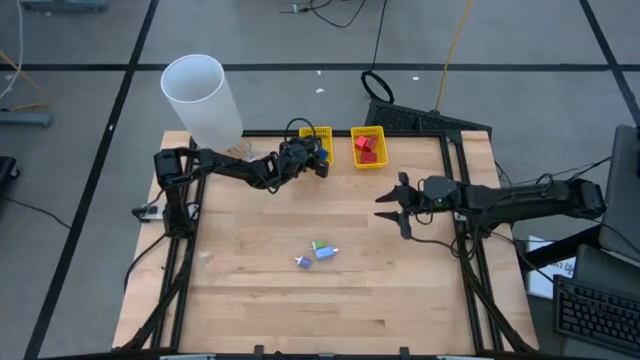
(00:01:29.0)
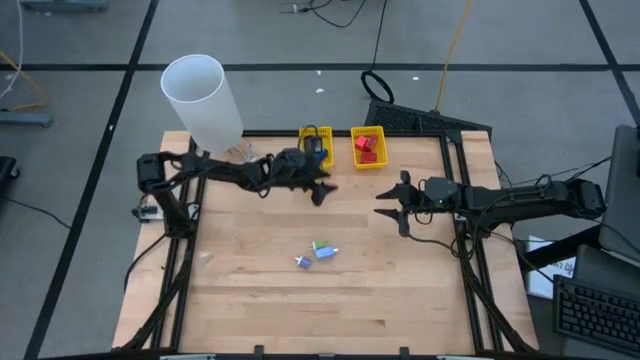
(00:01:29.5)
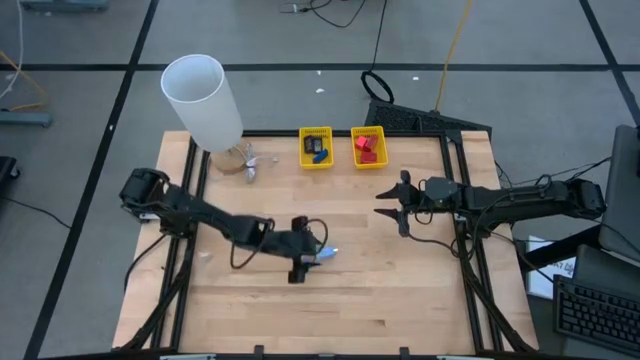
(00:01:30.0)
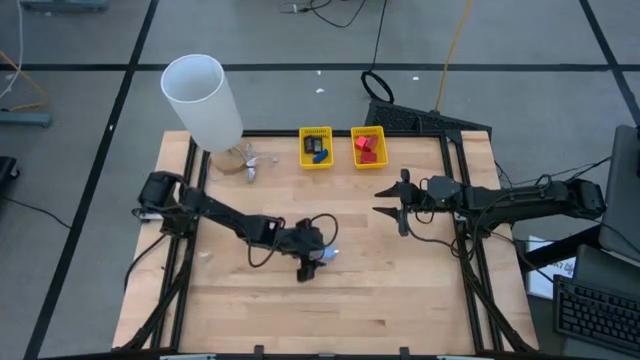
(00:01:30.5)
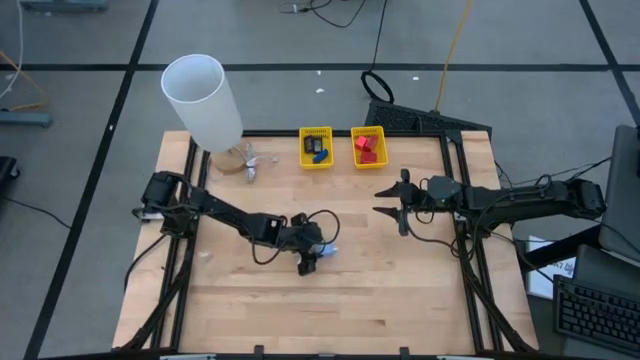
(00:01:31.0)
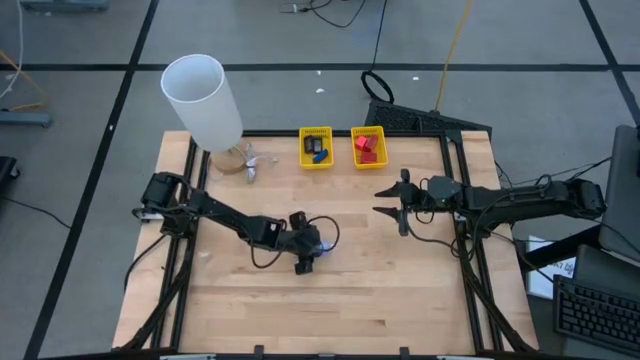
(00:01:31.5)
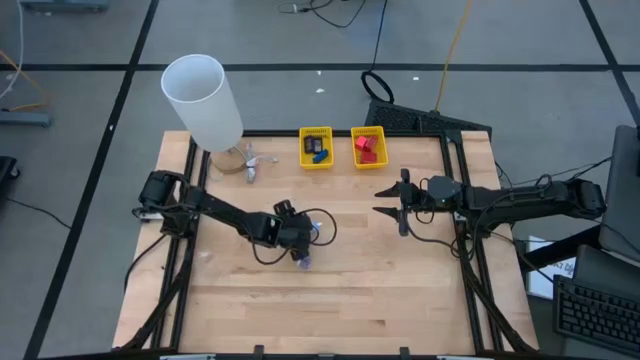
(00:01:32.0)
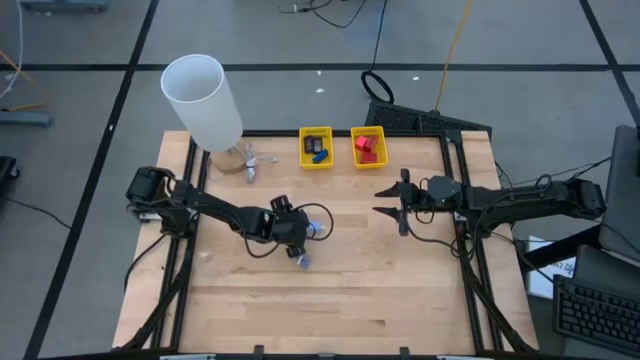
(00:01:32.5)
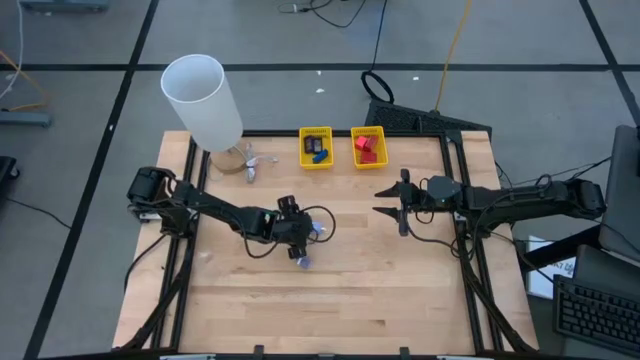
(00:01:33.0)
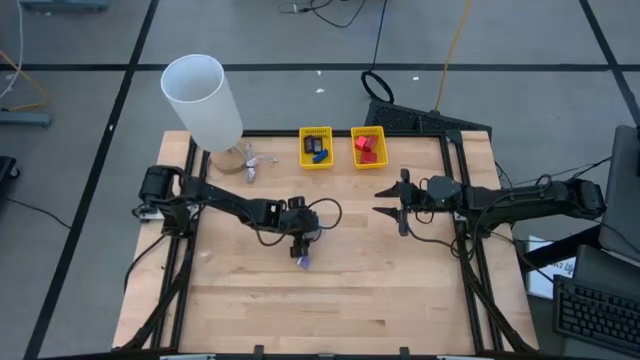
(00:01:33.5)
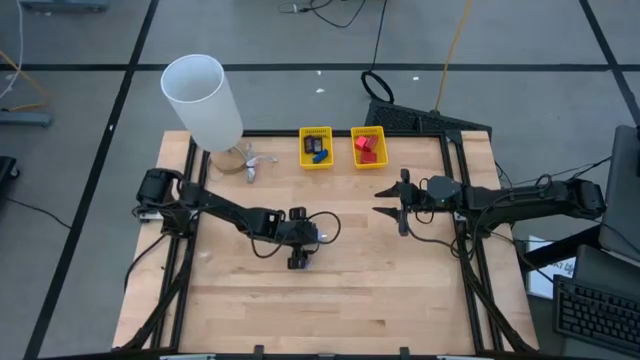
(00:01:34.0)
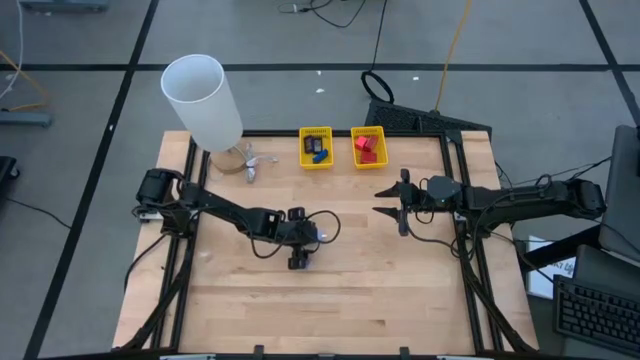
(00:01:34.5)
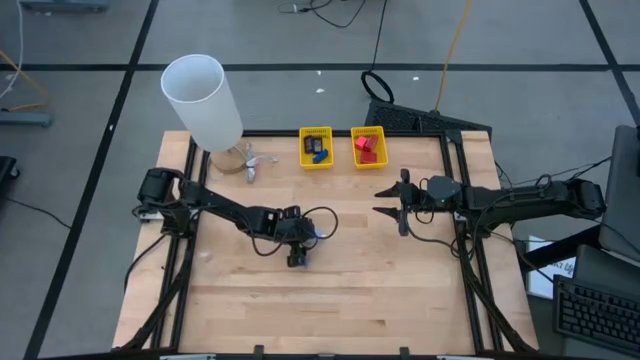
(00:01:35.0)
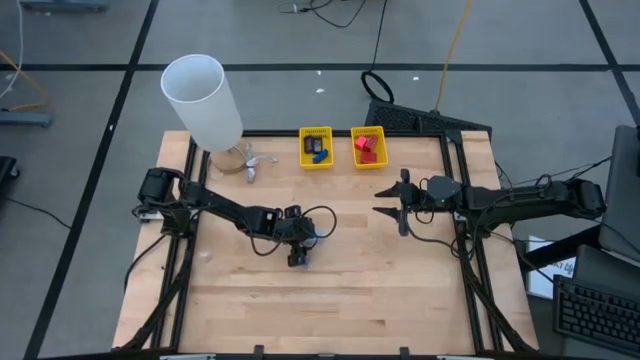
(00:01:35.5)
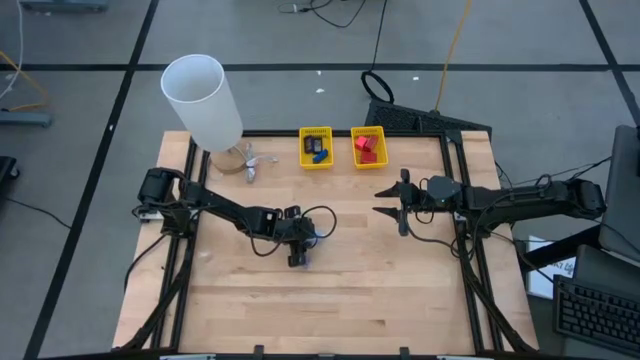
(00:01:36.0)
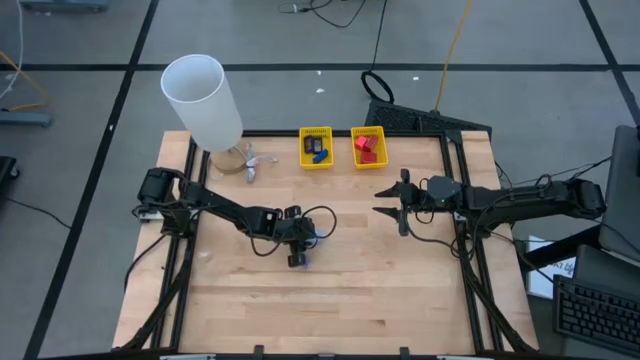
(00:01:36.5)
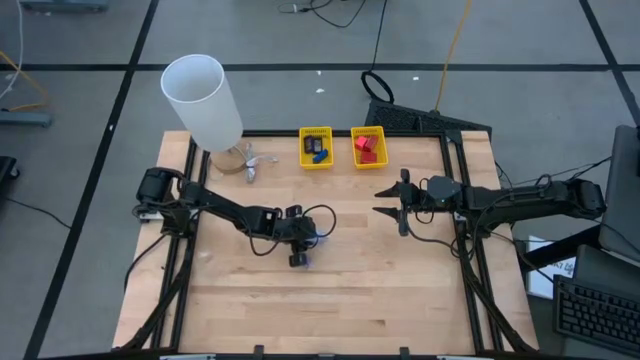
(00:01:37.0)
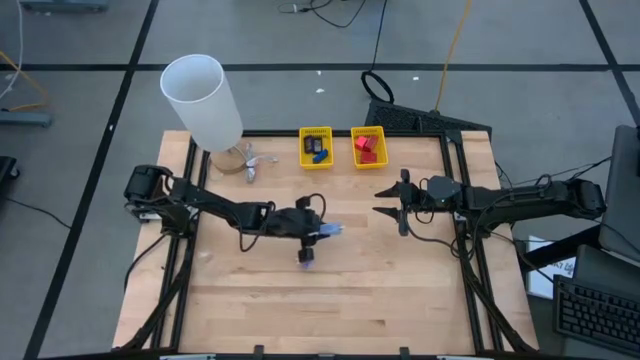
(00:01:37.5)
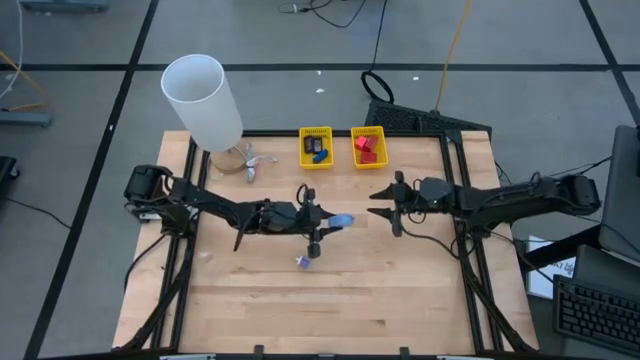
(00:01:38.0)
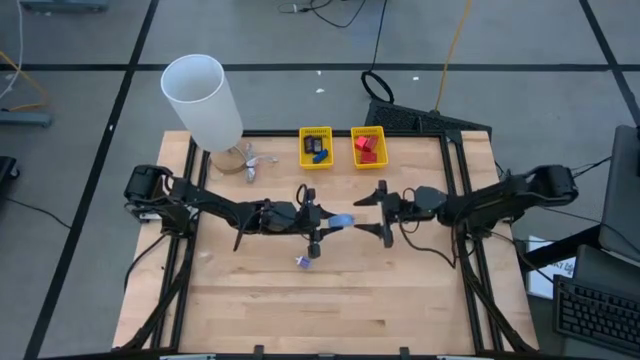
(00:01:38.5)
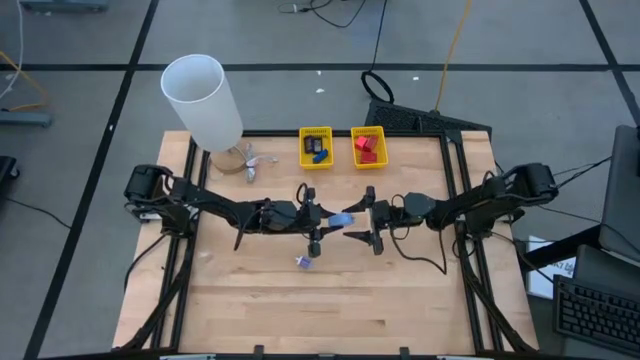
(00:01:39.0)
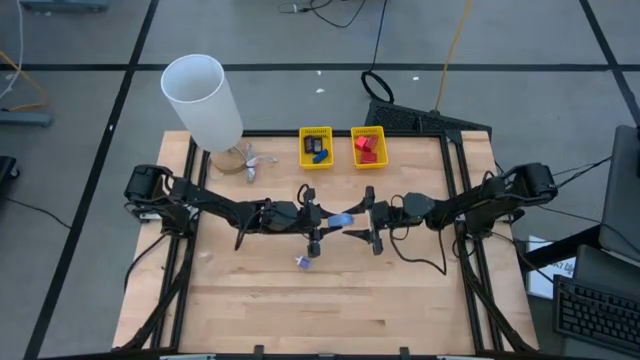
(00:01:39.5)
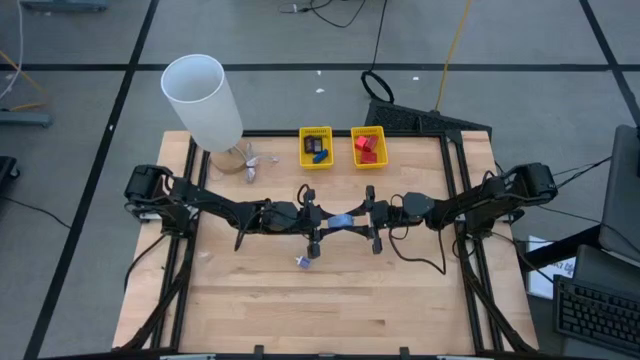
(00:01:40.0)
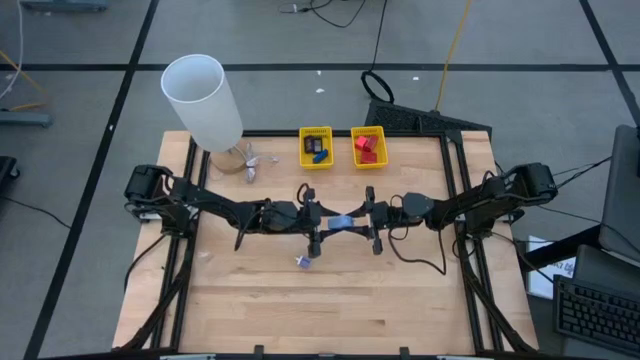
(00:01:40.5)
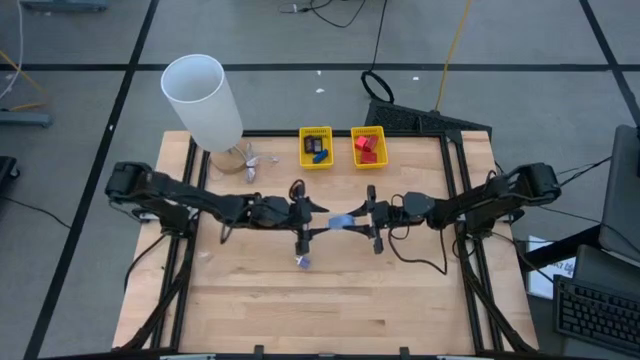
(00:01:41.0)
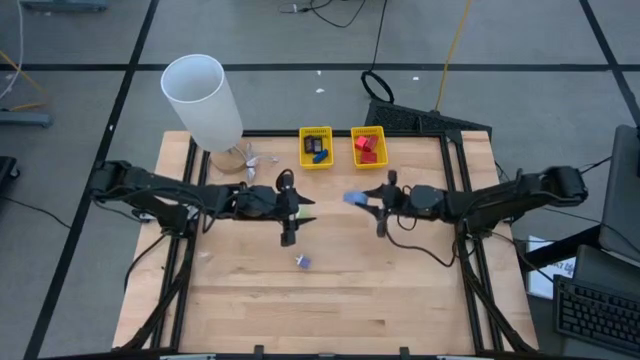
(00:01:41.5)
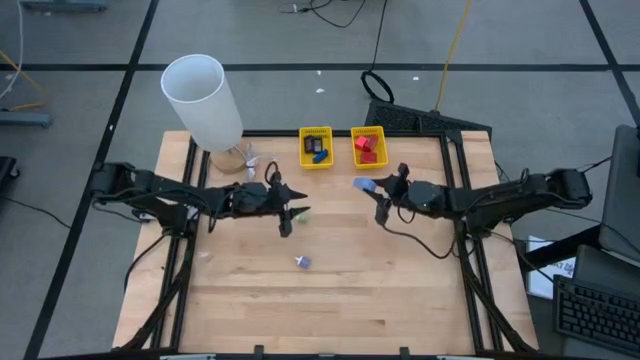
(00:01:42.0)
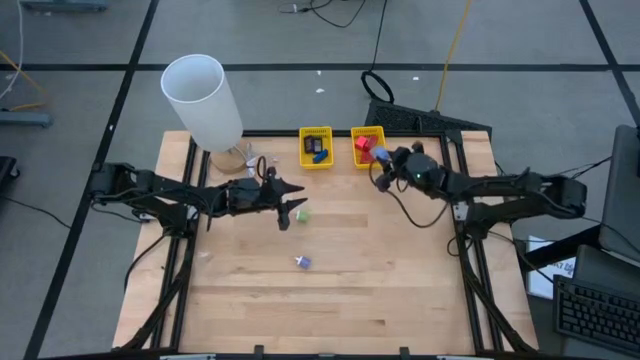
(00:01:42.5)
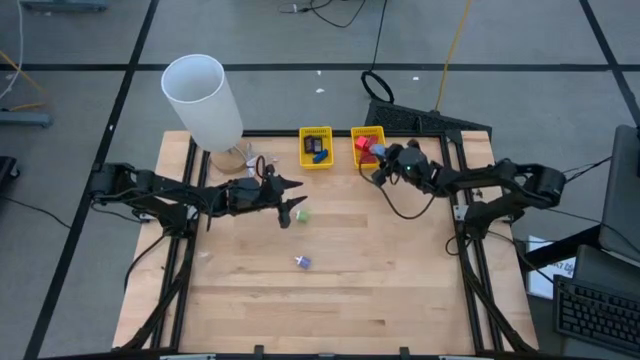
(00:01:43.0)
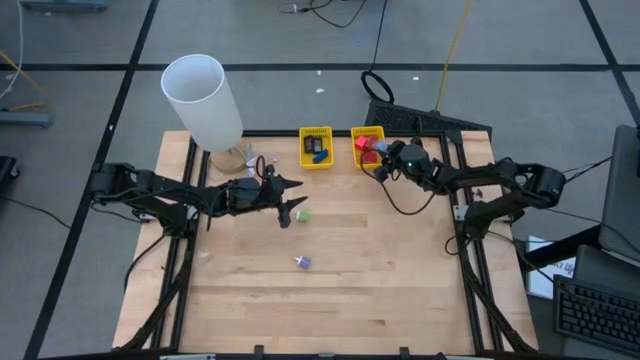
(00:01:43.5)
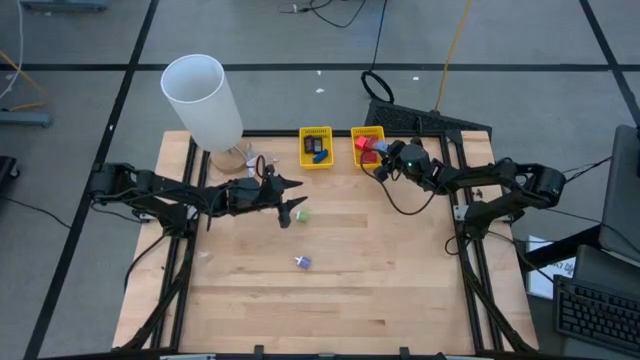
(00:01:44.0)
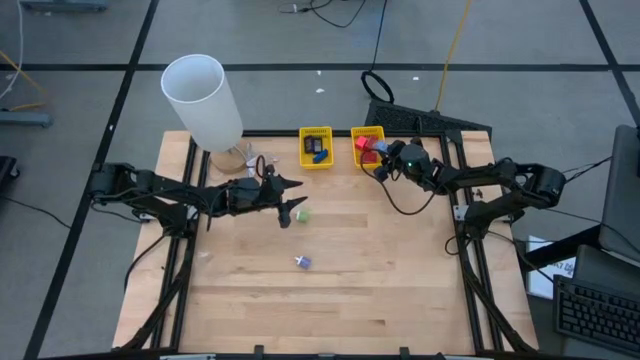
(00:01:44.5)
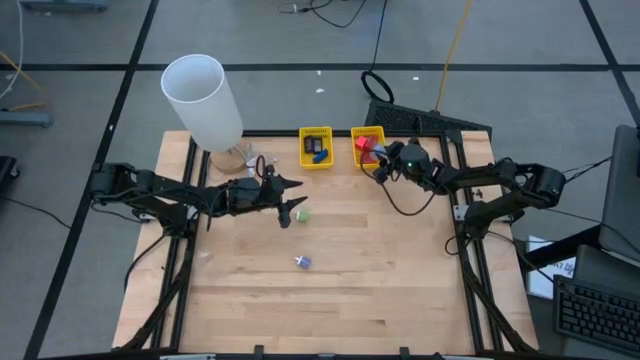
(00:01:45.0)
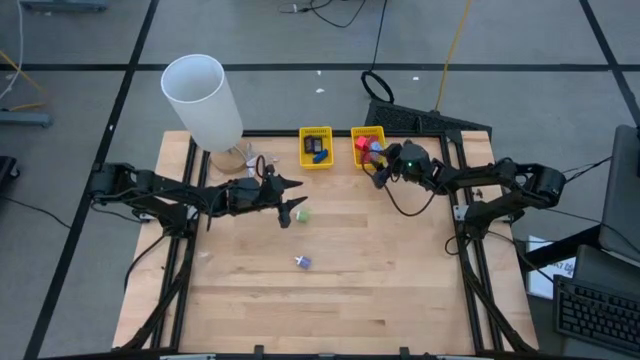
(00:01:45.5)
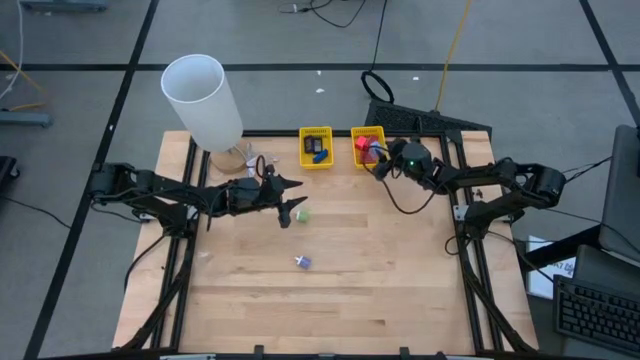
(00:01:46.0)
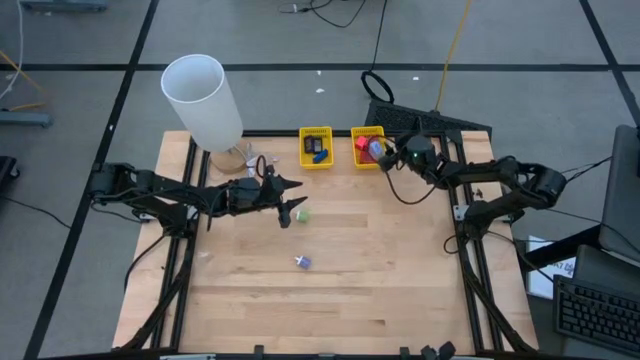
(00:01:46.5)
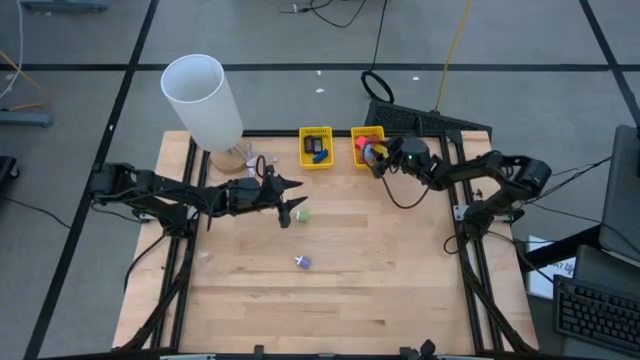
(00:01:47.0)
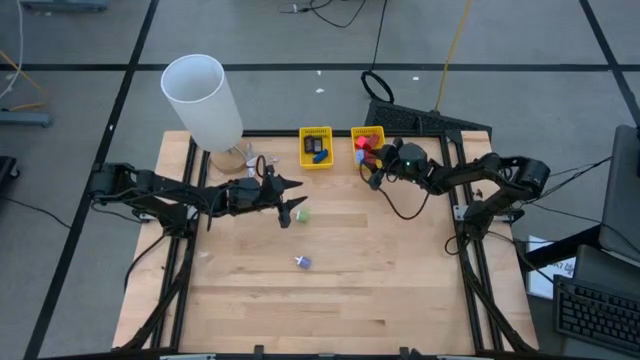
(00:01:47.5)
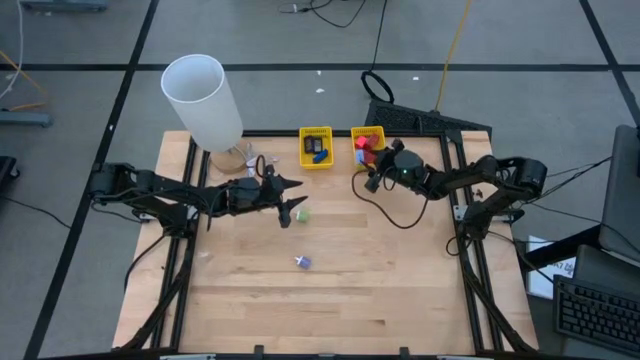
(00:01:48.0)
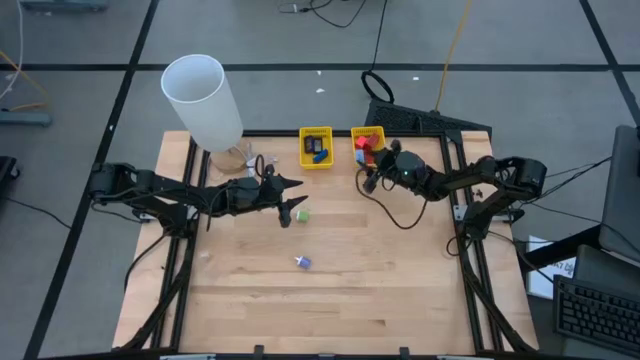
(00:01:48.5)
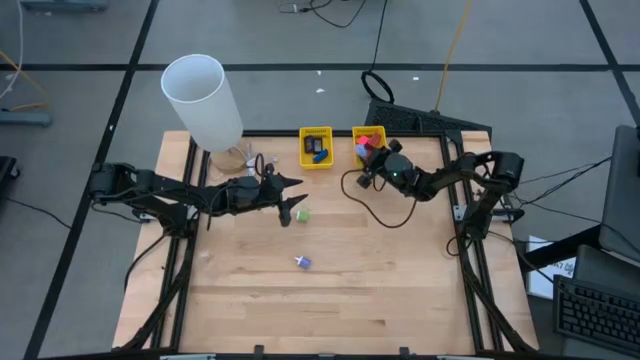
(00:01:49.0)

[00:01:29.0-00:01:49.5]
Task: Pick & Place Office items
Put the light blue charger adapter into the right yellow bin
